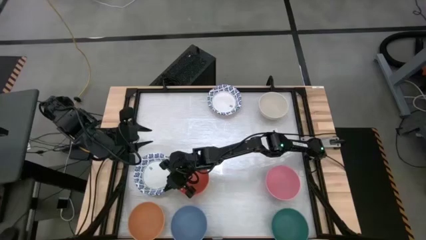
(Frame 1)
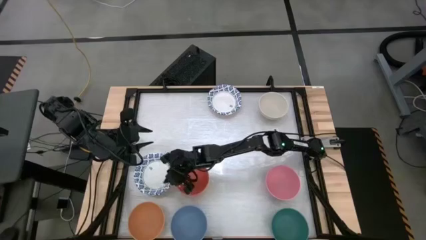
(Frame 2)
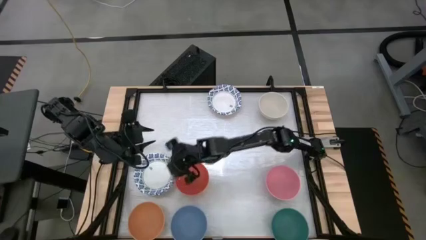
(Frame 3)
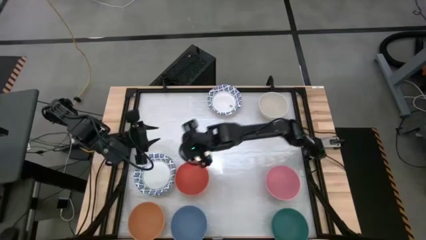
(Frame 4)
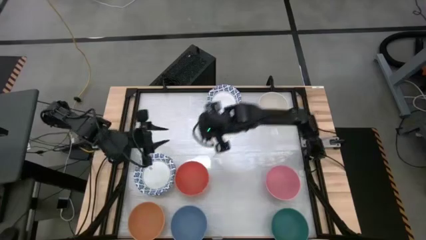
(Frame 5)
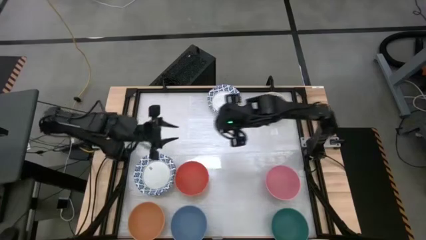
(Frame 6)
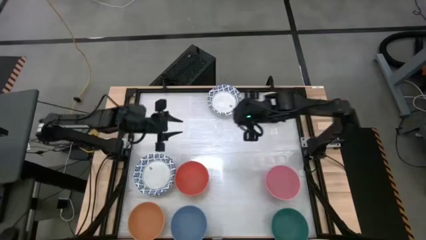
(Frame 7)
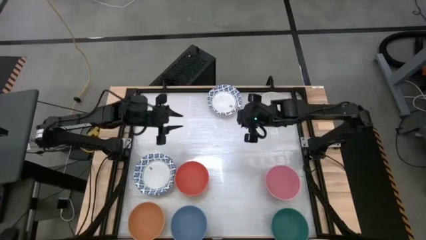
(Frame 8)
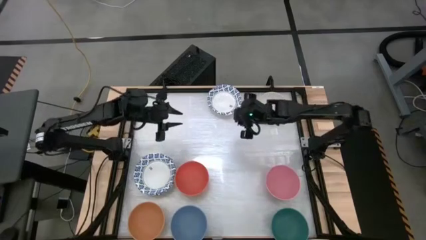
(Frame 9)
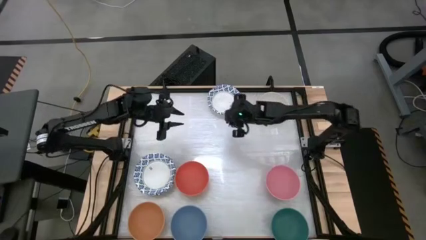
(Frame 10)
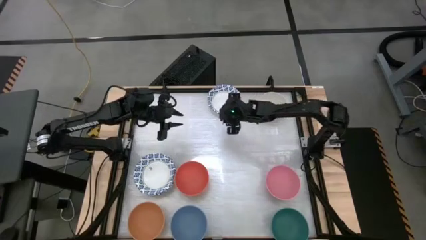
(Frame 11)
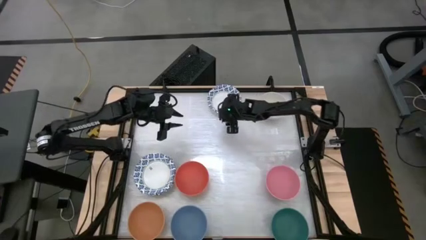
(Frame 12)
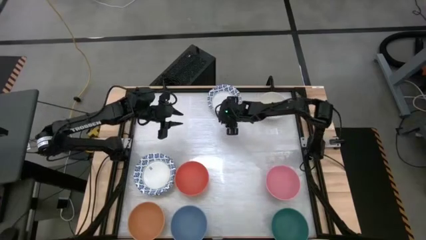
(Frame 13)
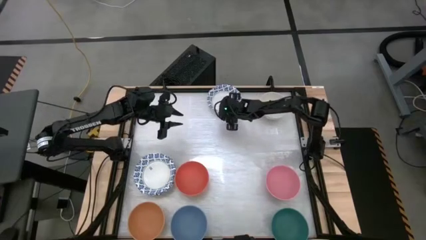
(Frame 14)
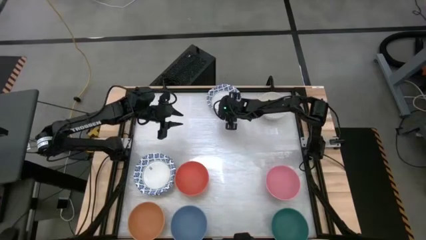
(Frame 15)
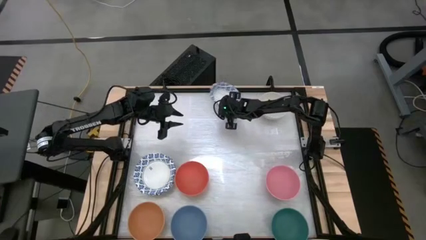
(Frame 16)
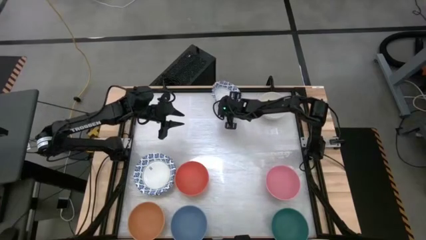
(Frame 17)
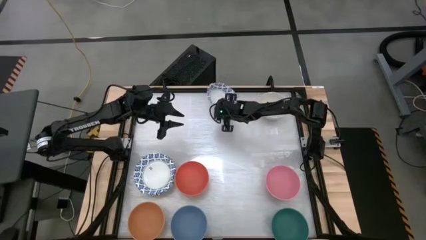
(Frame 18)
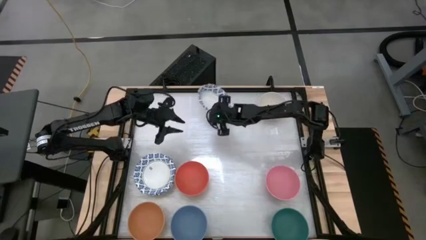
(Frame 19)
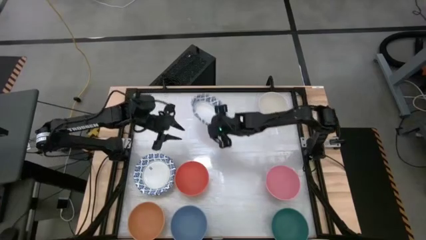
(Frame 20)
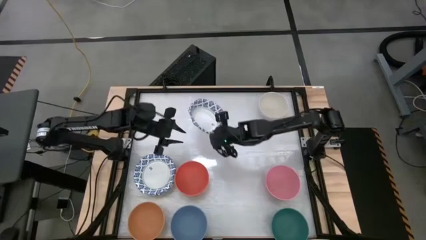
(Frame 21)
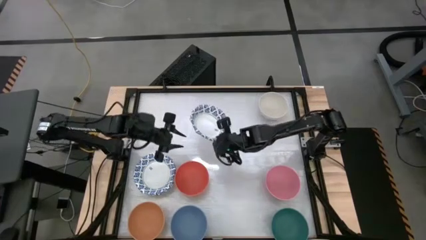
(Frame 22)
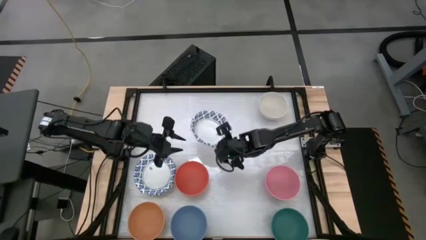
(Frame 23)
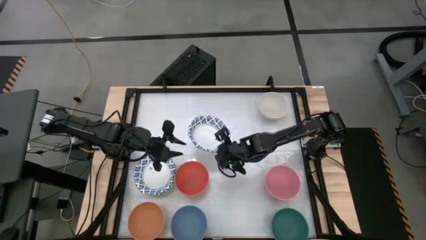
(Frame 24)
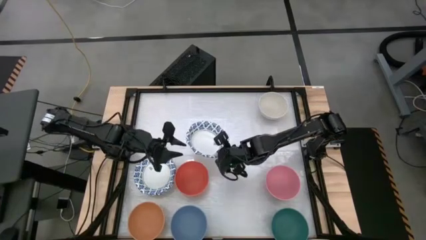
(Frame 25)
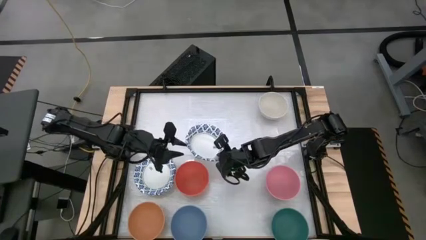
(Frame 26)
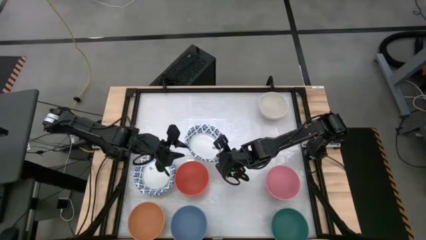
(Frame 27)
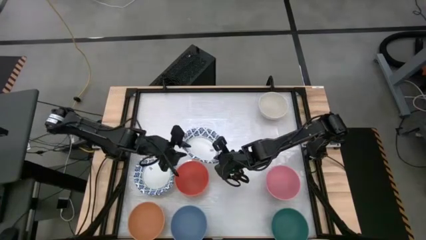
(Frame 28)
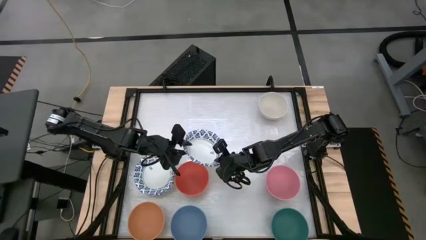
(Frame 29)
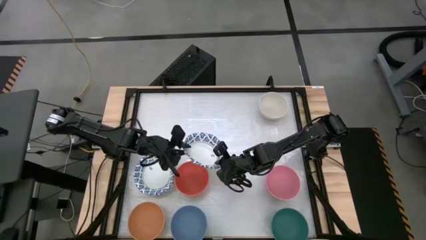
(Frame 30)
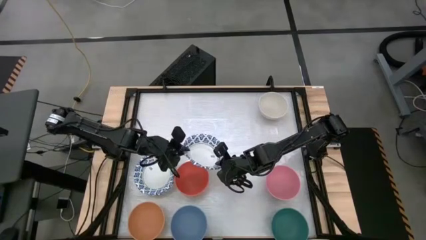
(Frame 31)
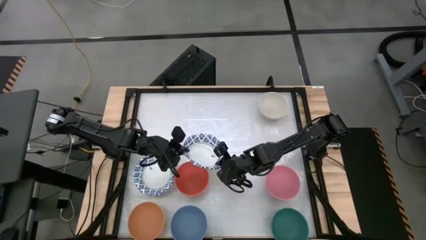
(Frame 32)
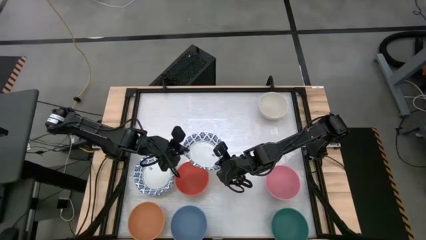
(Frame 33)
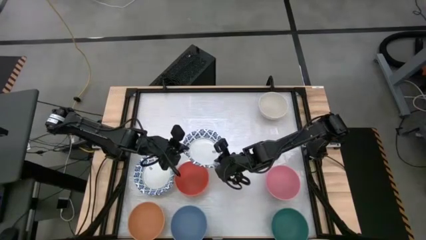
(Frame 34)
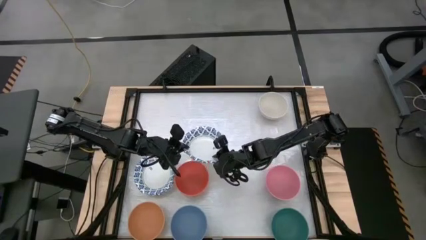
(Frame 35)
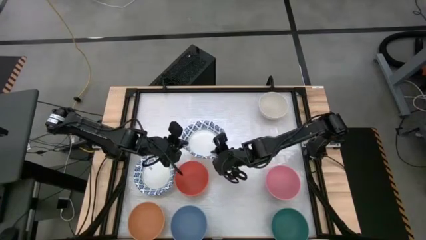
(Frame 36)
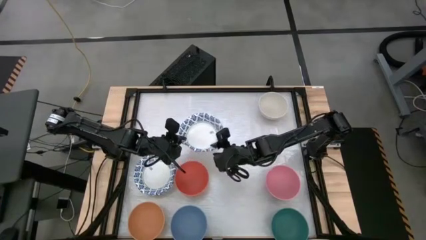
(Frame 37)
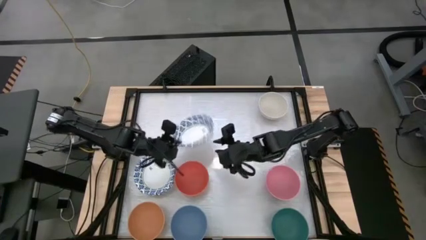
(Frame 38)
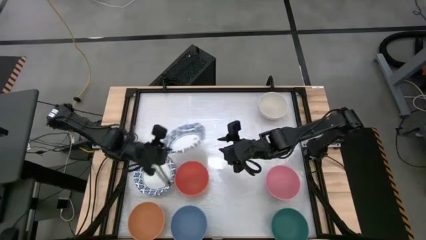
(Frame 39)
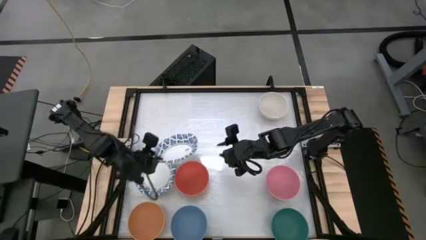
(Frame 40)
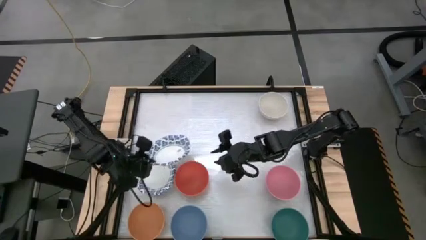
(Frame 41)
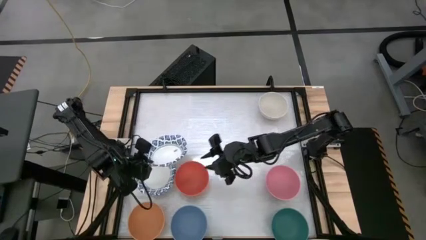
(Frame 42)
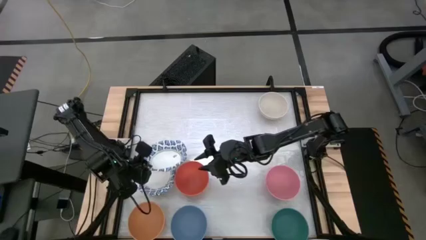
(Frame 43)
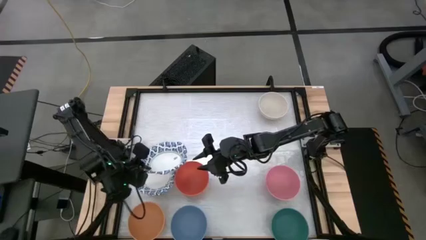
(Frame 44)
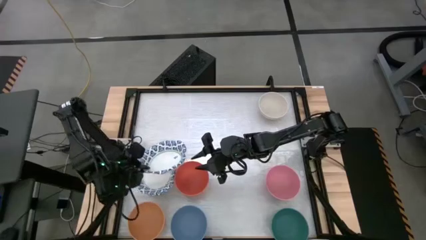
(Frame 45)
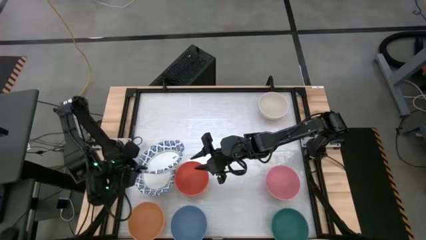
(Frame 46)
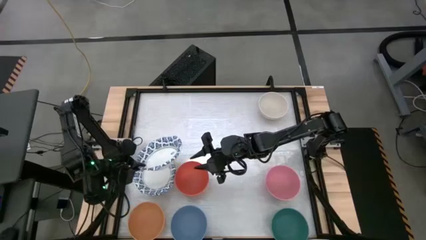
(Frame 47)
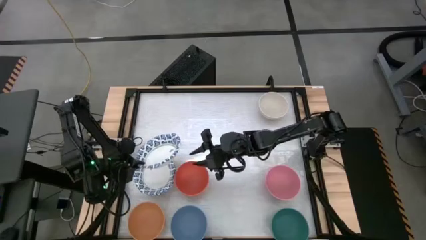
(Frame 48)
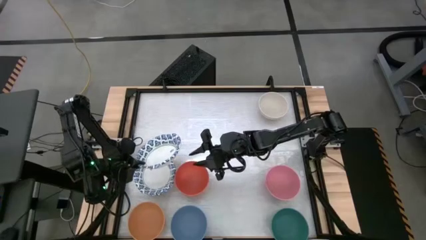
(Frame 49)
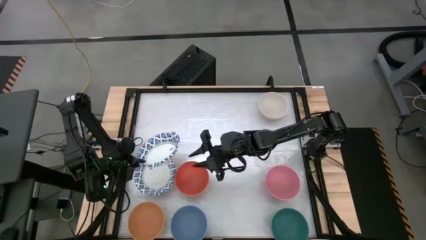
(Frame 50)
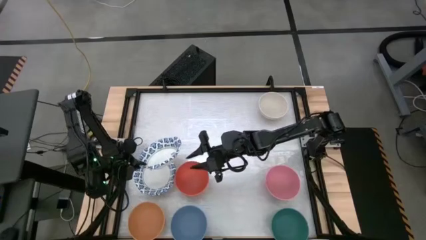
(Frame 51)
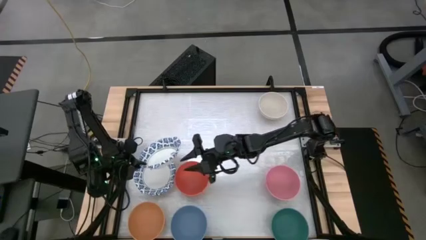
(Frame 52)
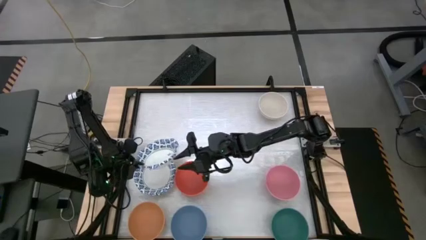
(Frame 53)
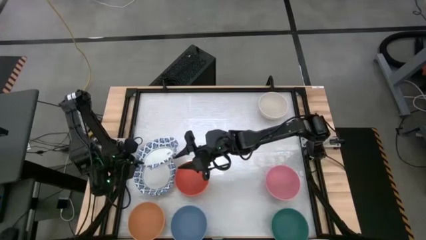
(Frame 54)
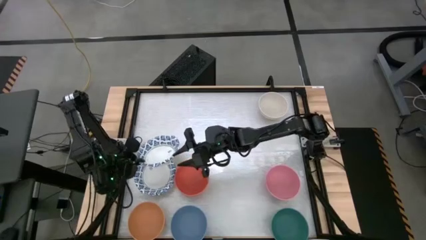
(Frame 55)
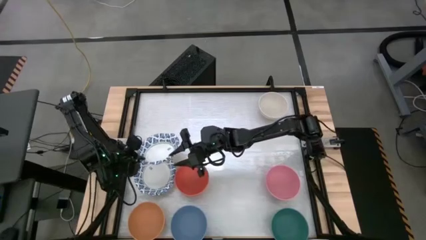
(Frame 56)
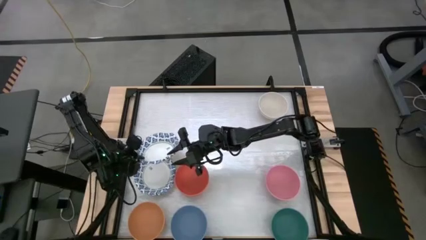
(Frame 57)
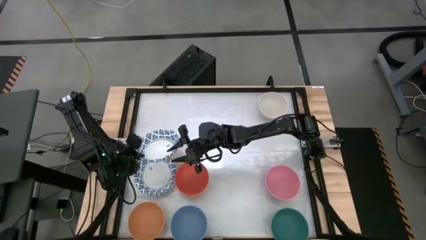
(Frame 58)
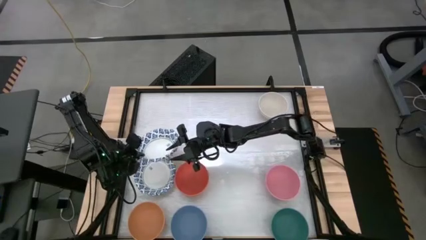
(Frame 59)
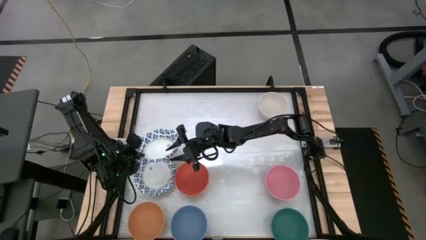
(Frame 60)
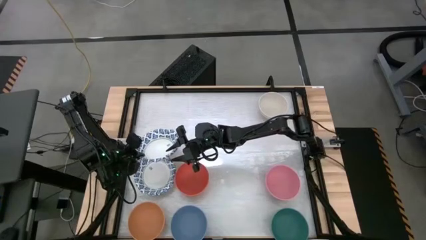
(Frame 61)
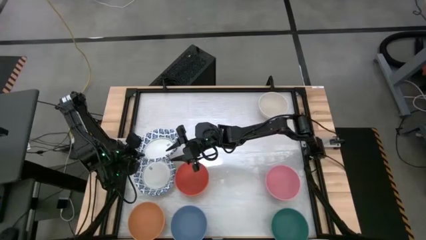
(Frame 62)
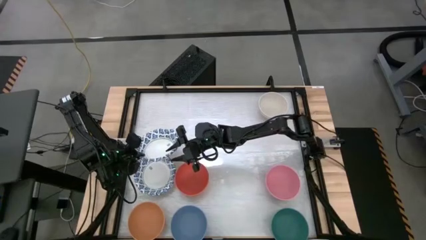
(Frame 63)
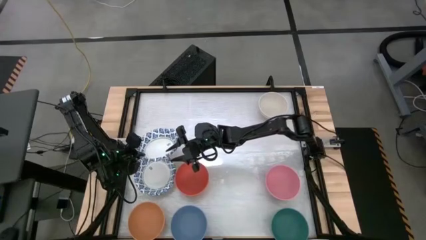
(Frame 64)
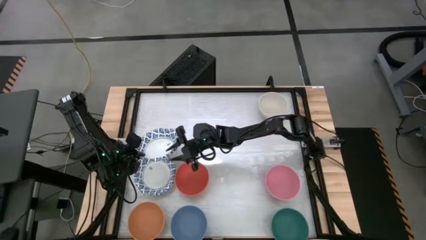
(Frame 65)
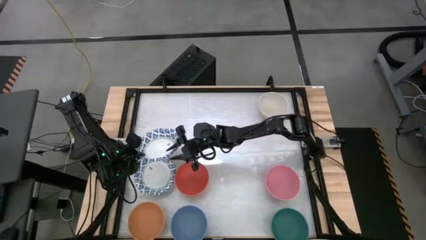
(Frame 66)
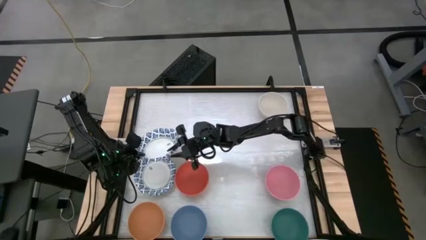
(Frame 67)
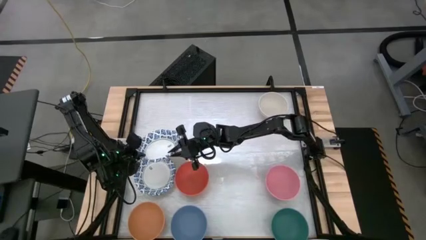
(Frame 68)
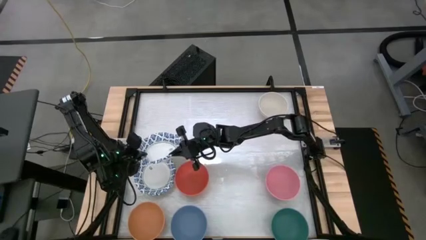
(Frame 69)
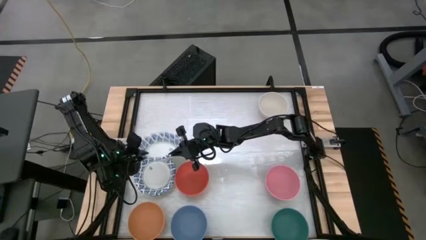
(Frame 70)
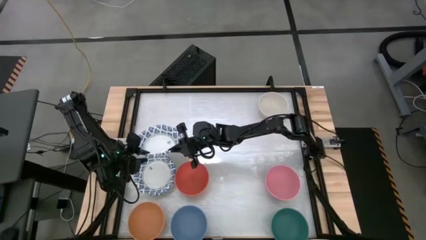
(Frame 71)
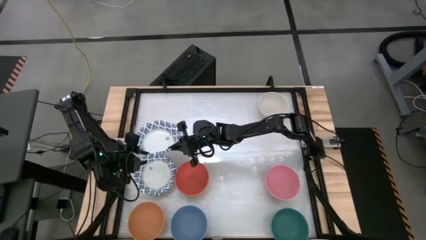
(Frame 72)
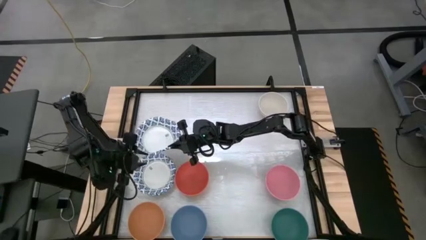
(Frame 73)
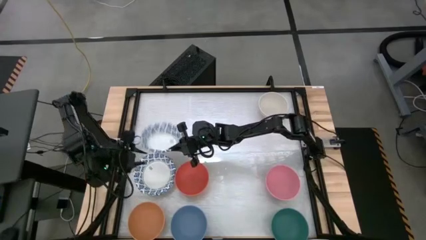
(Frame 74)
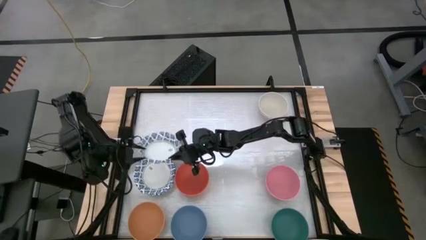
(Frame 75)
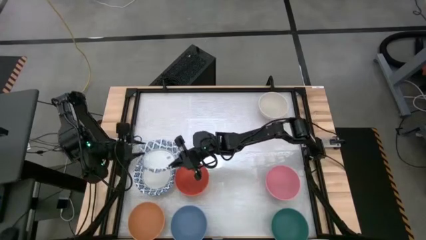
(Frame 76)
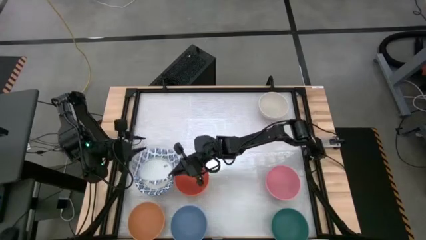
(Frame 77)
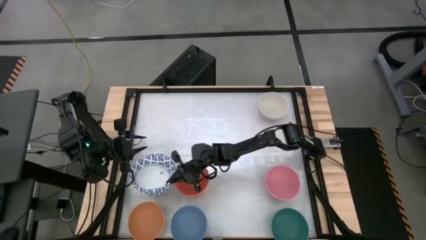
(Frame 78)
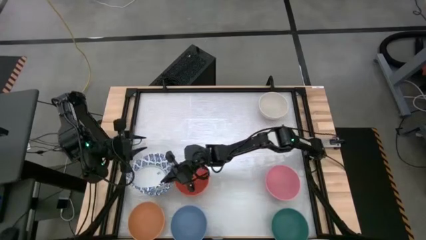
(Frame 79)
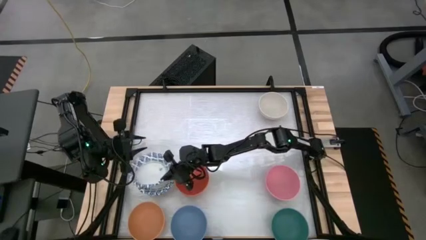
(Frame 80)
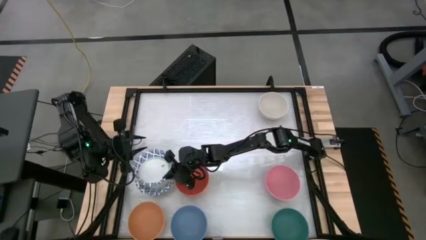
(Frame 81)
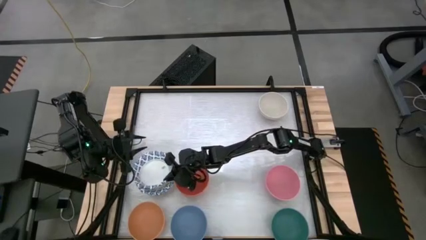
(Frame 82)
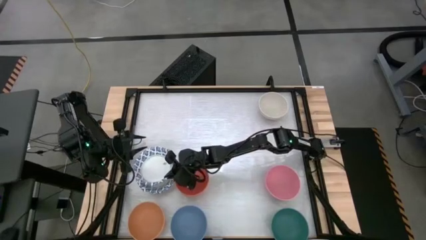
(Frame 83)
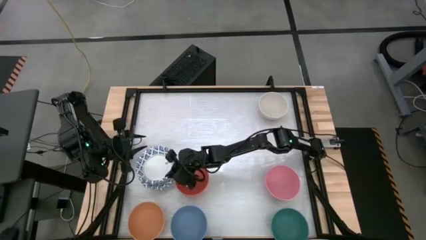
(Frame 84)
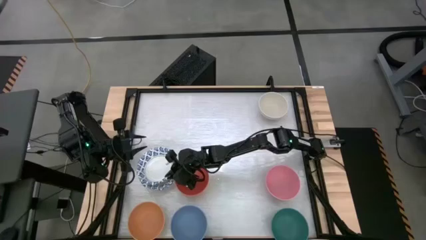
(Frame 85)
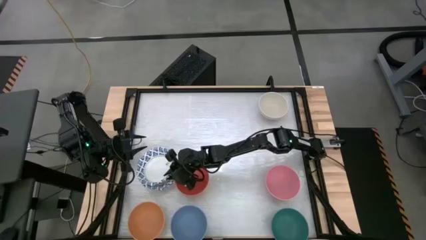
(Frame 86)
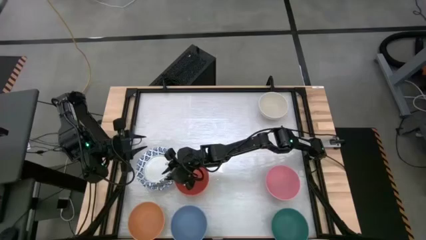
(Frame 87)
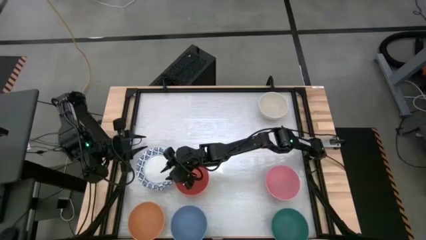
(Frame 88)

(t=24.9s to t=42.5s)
Stack the blue patterned bowl into the blue patterned bowl
